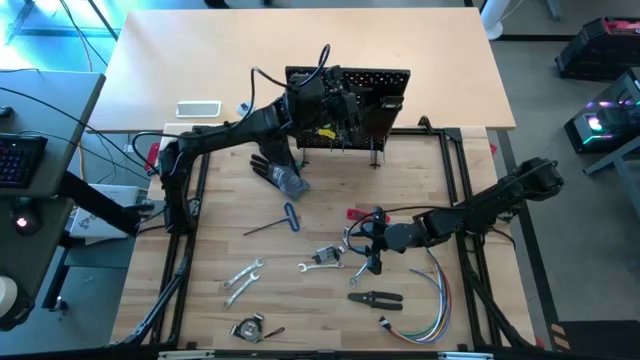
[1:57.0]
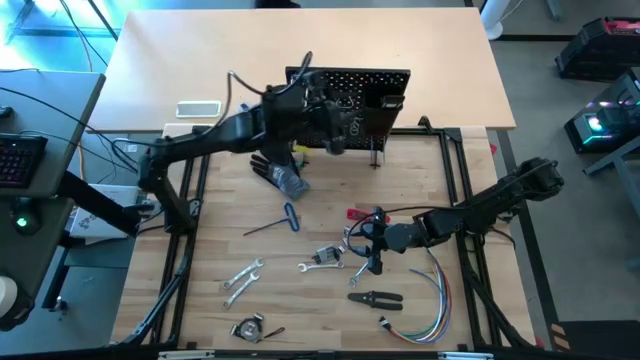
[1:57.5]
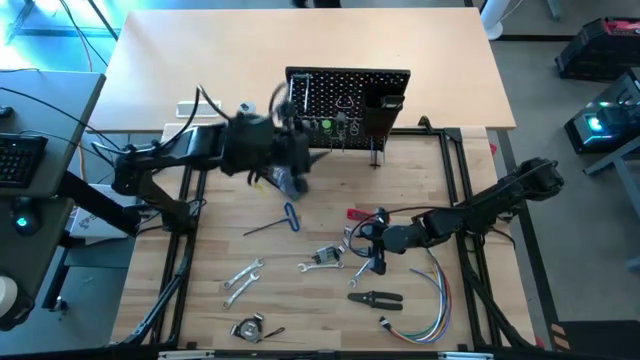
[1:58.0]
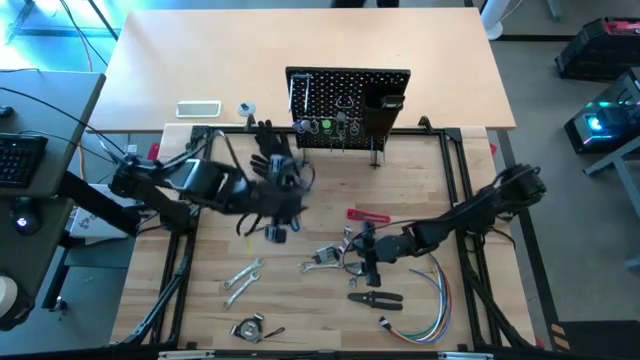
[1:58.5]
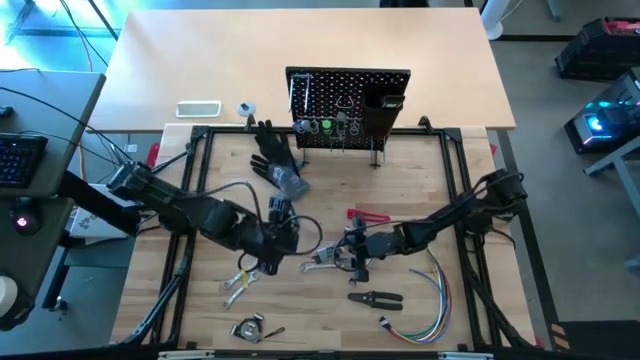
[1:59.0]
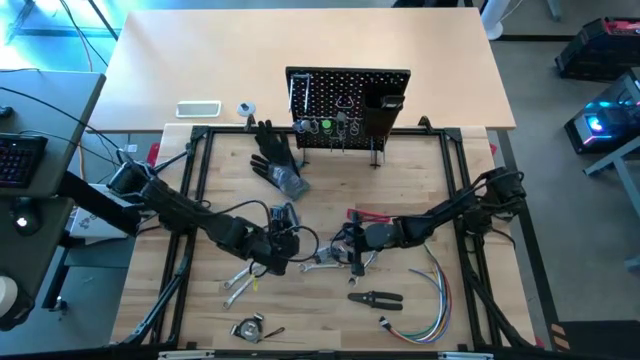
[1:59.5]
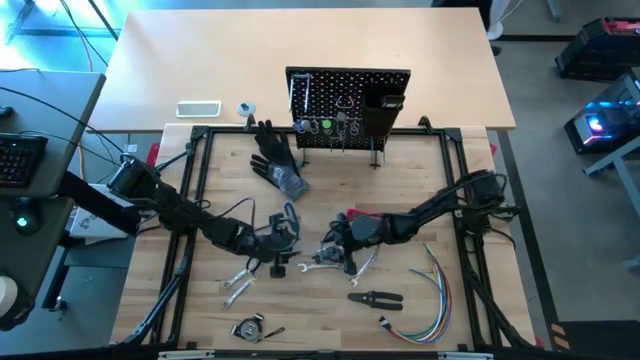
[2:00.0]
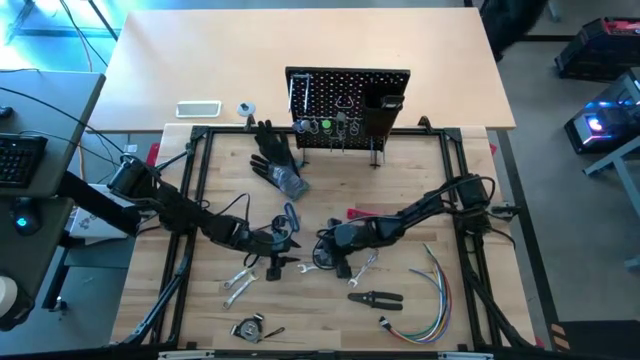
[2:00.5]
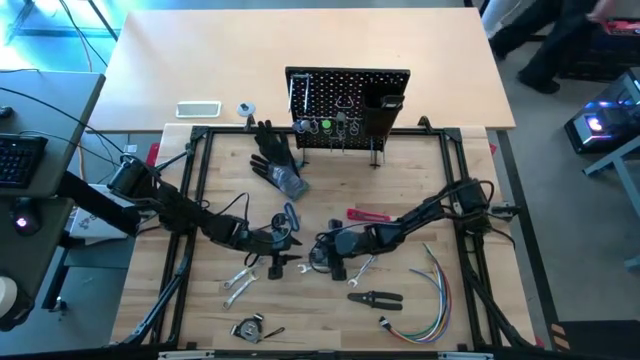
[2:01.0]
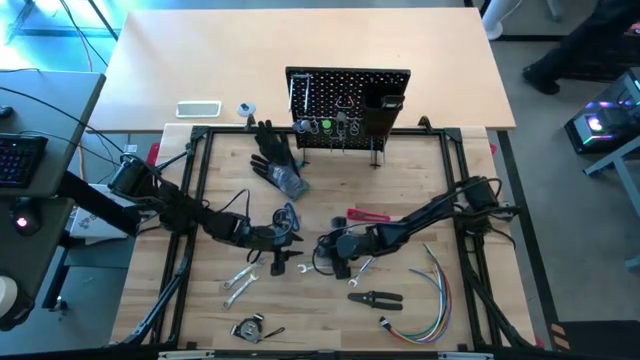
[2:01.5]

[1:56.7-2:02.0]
Task: Hang tools onto peg board
Put the hex allen key set into the black bin on the pegboard

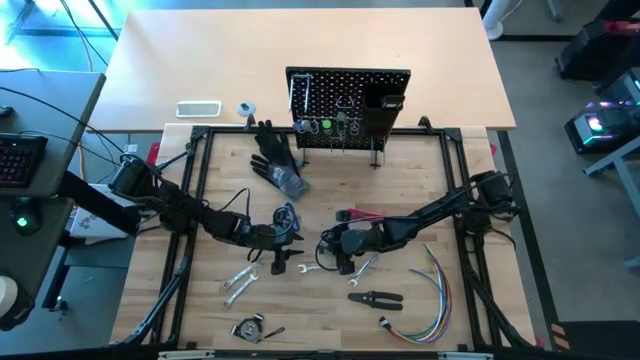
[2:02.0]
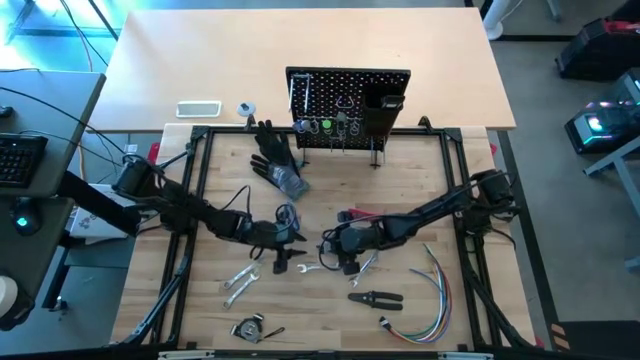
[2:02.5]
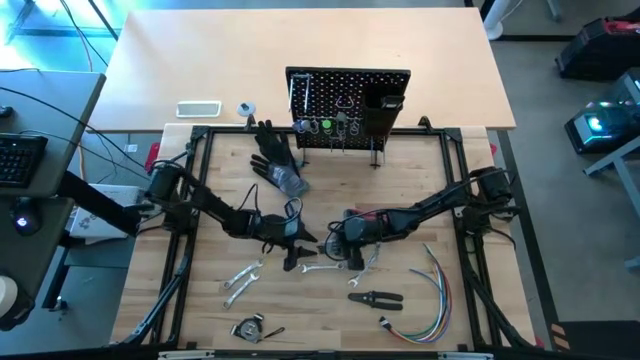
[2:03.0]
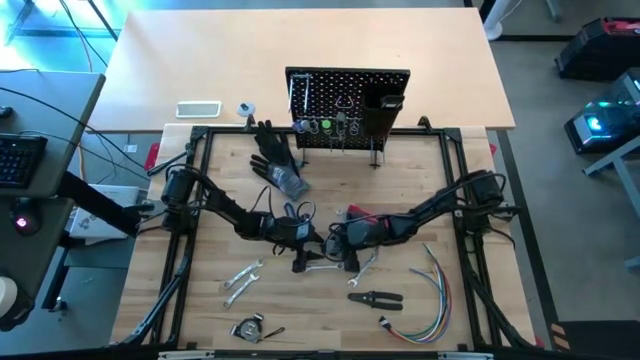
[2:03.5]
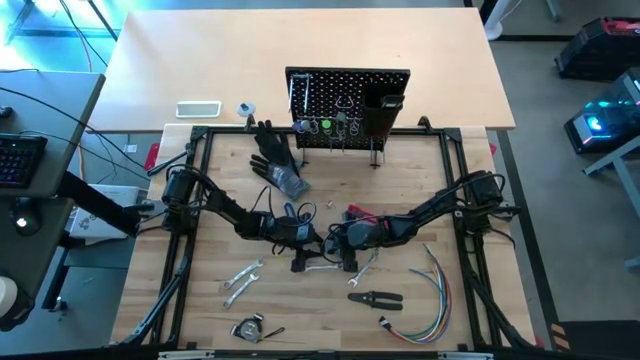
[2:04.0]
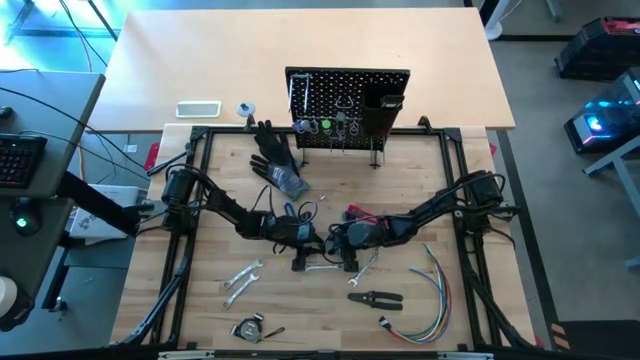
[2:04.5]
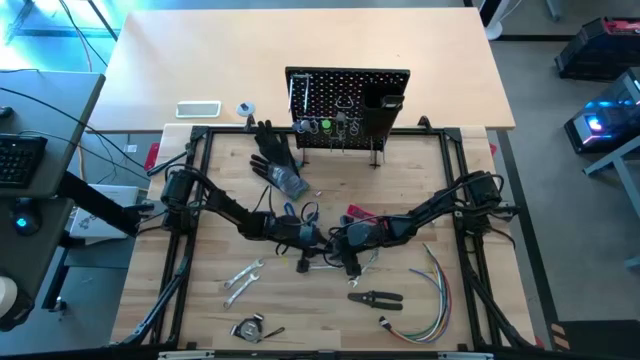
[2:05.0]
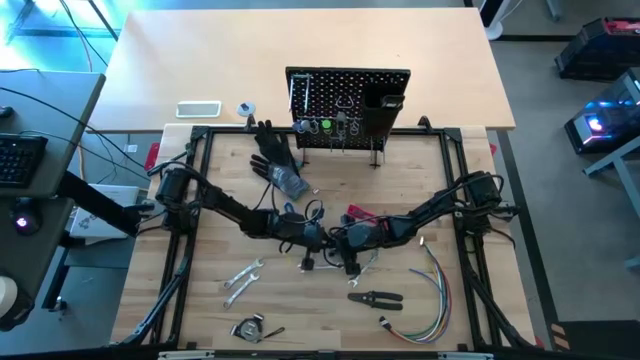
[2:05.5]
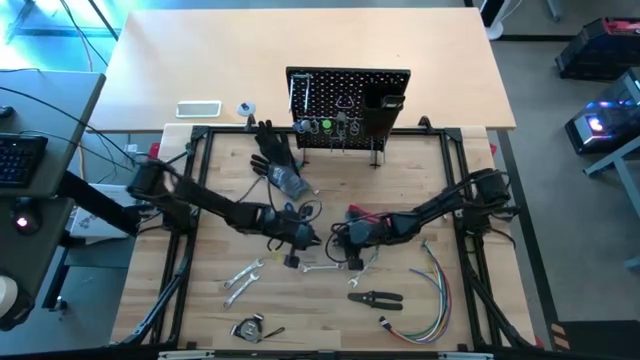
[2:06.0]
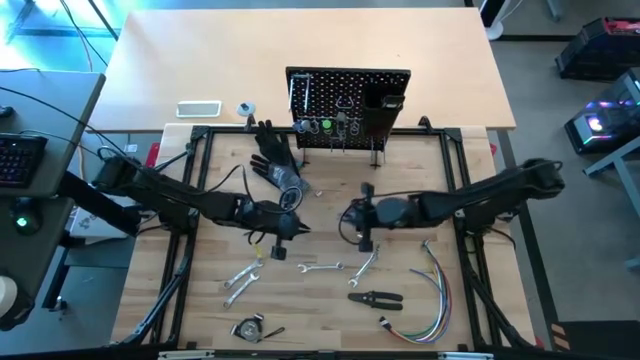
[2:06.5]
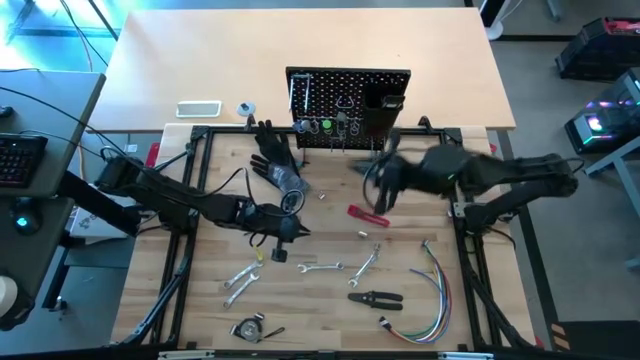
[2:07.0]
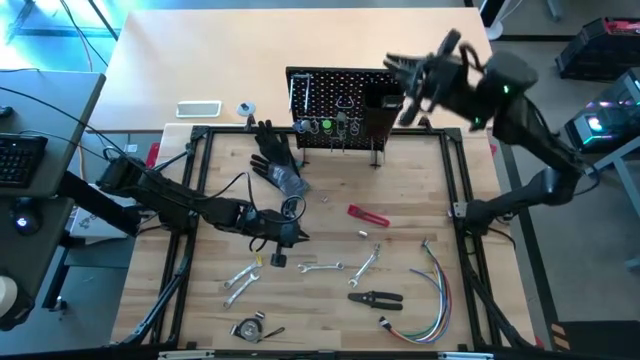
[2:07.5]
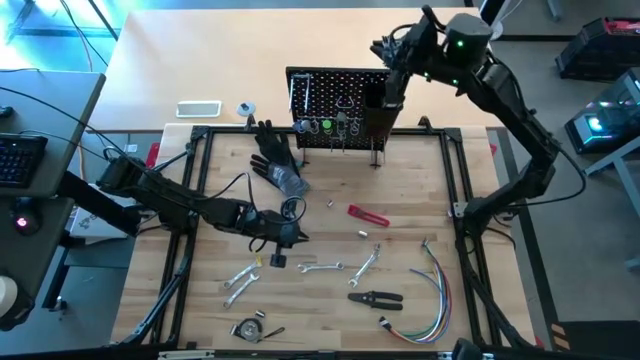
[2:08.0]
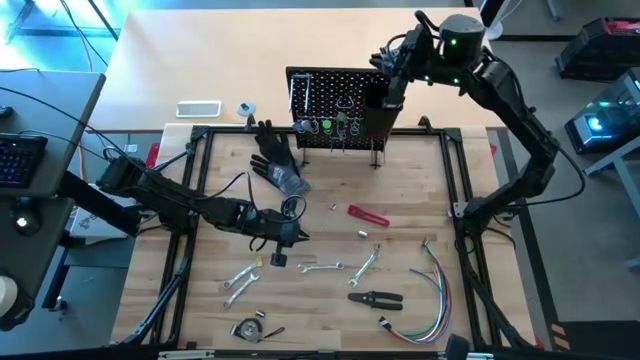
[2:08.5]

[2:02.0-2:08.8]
Put the hex allen key set into the black bin on the pegboard

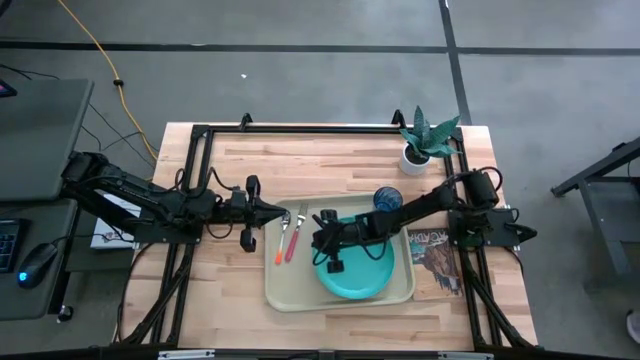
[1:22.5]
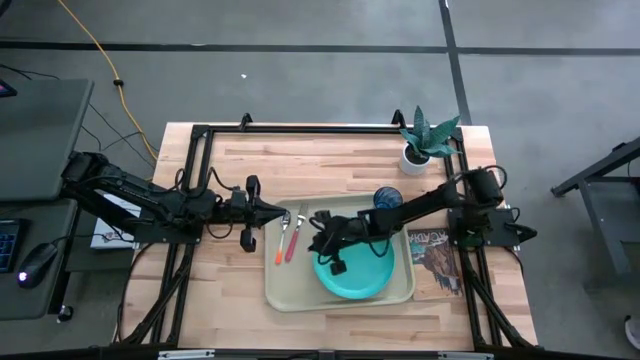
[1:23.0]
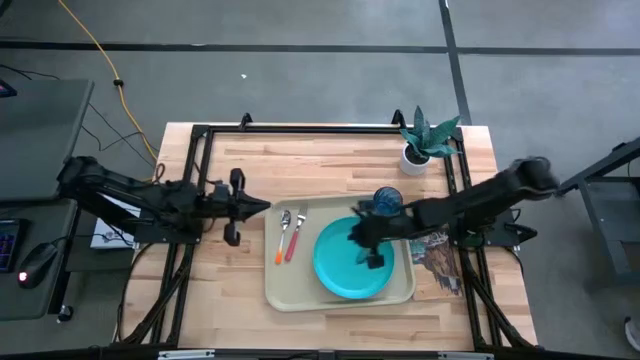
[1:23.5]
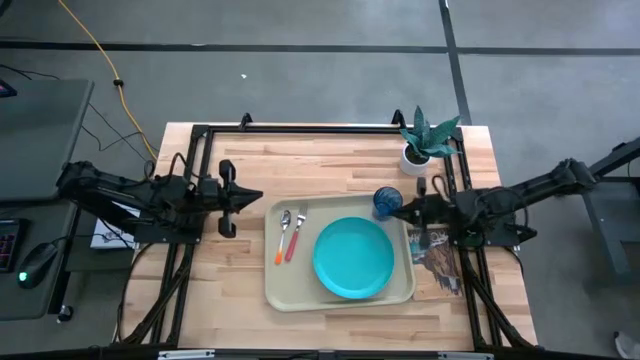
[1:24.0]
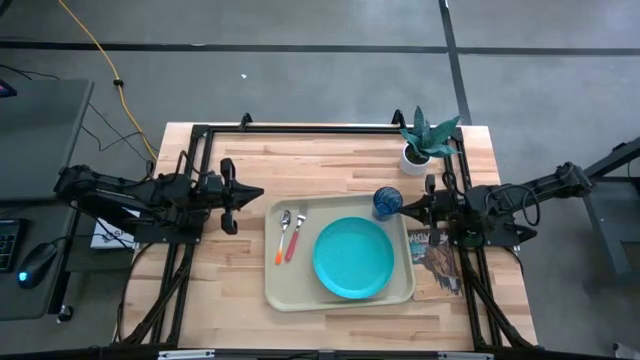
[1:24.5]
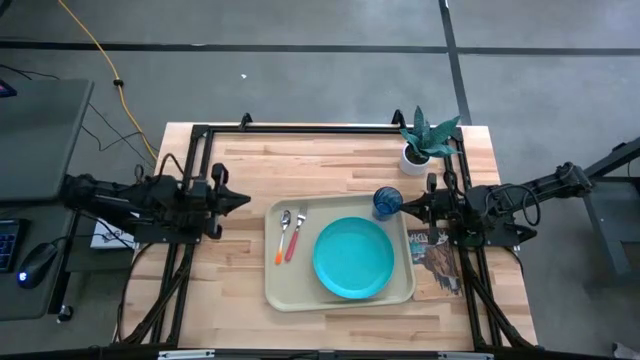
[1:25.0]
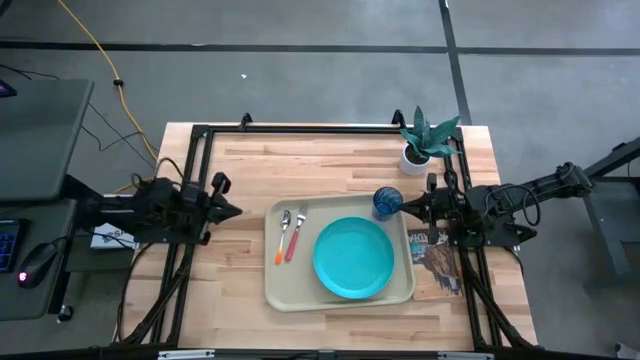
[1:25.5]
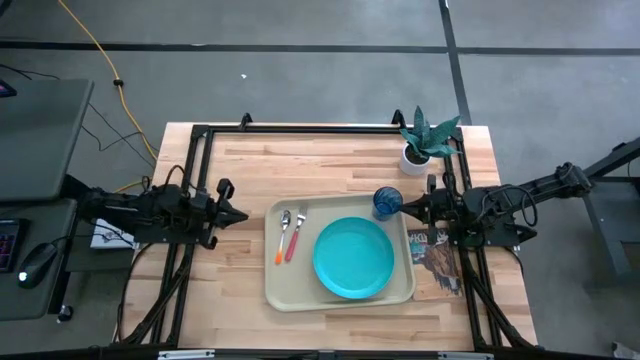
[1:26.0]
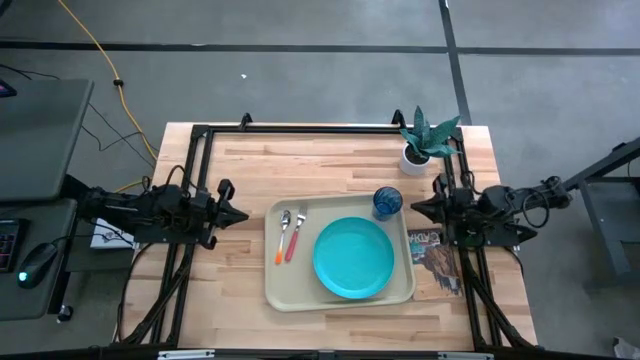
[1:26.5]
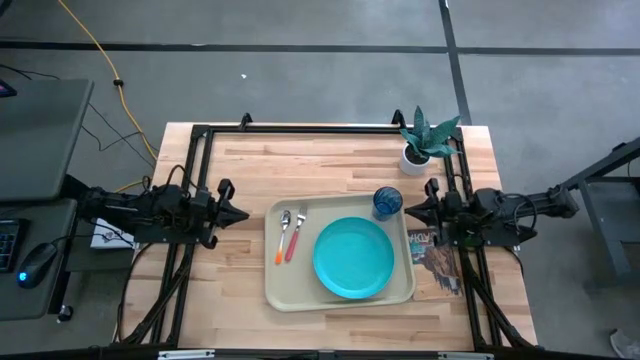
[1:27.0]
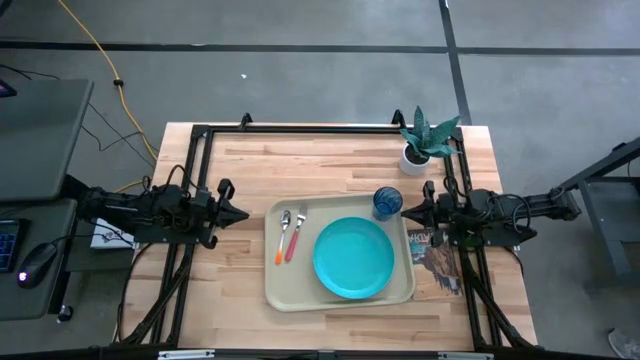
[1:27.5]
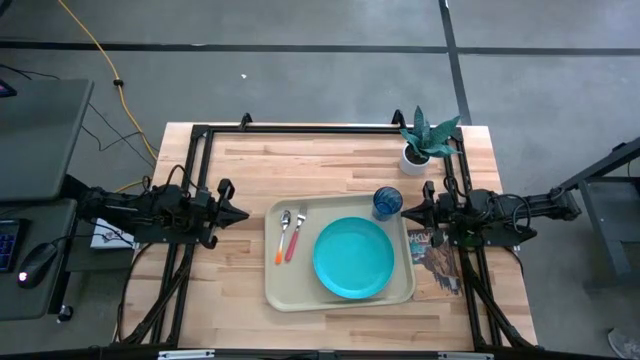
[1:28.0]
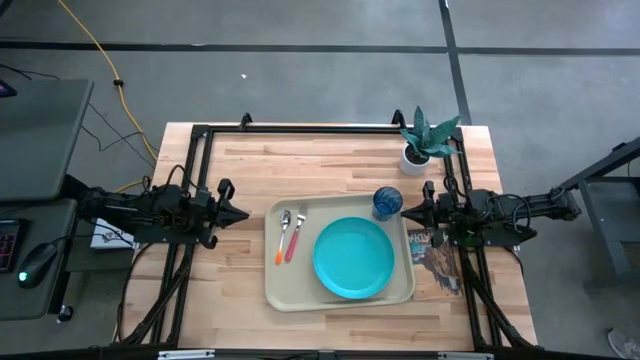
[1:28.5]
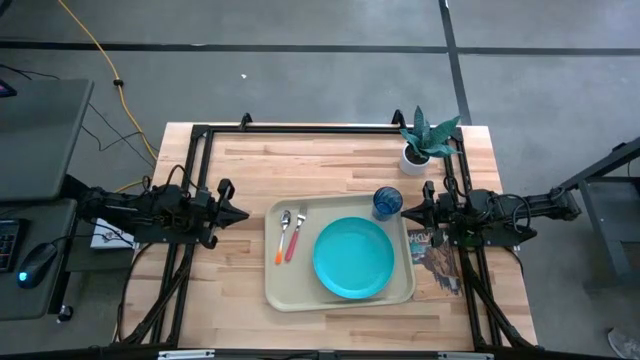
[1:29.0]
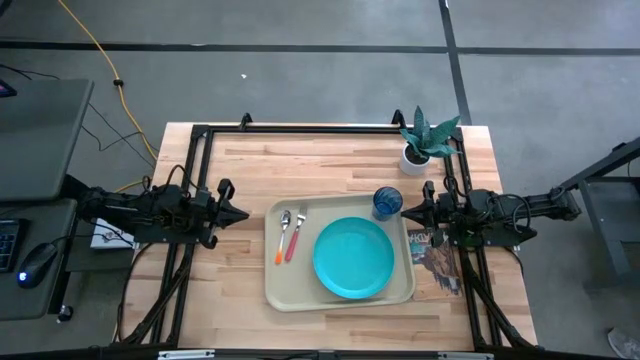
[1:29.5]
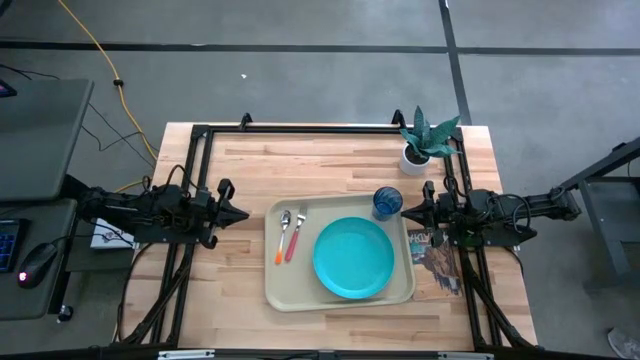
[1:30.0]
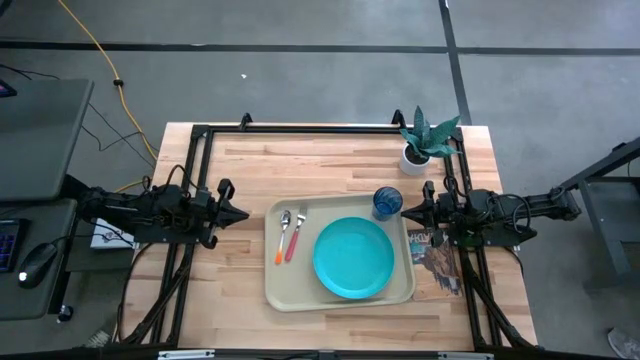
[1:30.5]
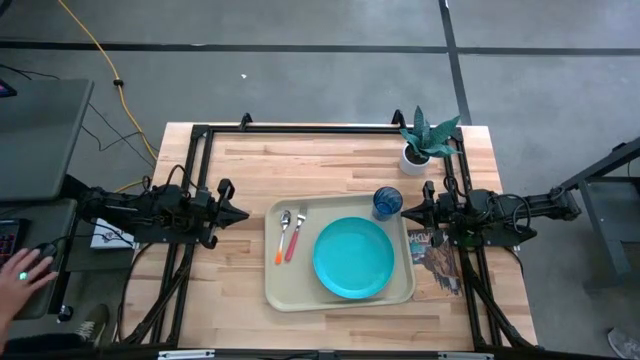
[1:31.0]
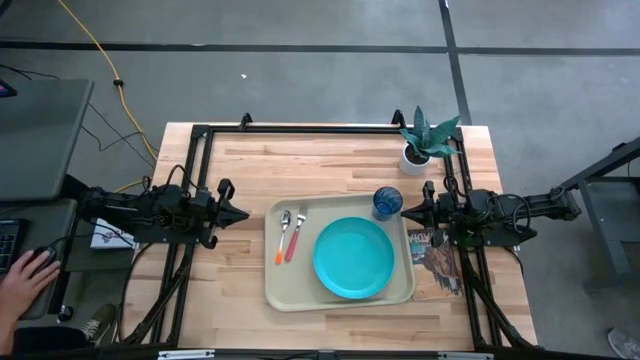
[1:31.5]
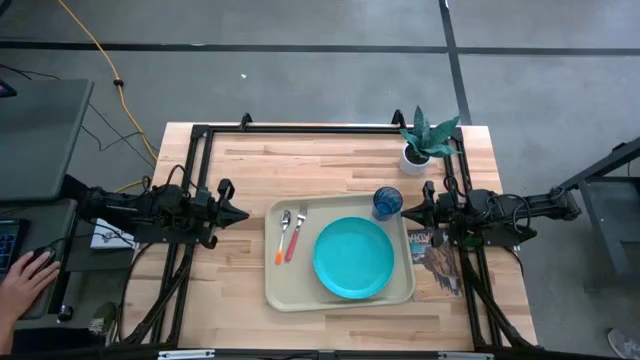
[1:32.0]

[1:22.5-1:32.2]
Task: Pick and place plate/cup/fork/spoon on tray
Return to Home Position
